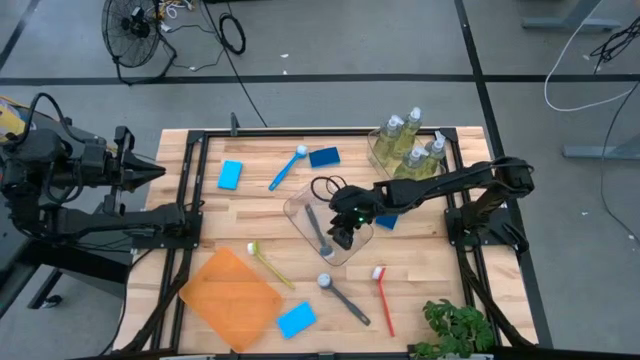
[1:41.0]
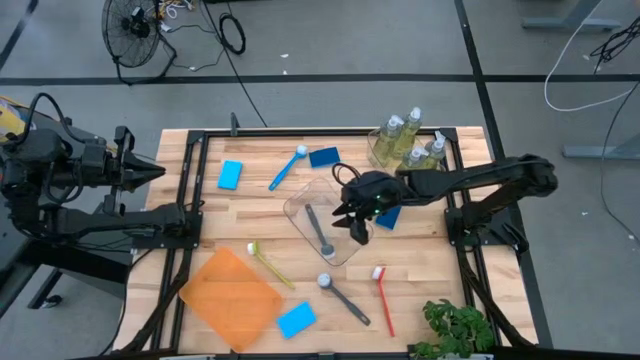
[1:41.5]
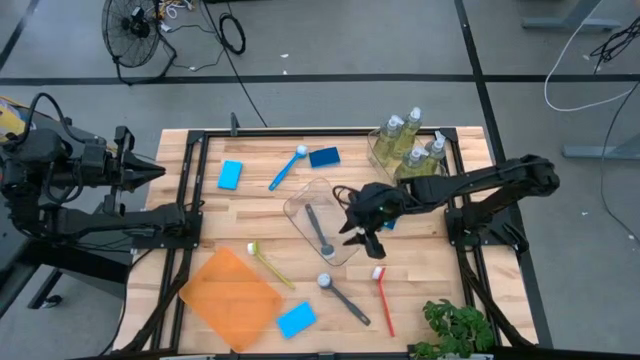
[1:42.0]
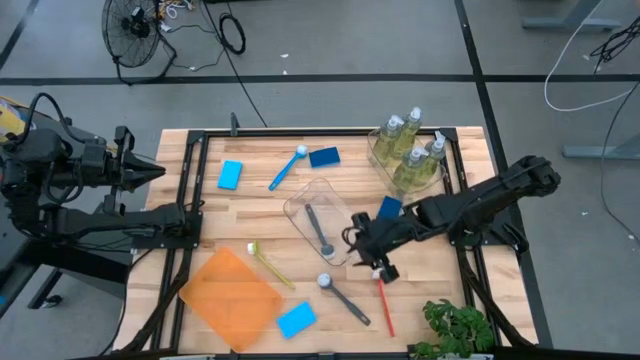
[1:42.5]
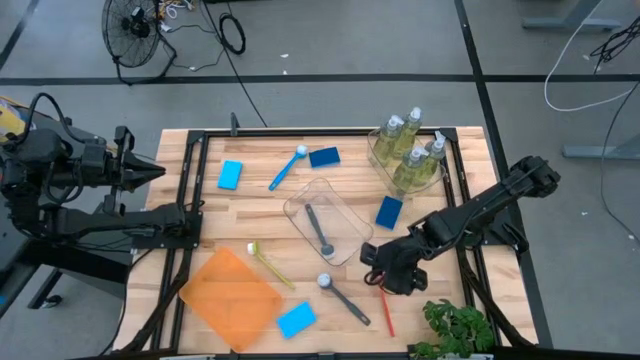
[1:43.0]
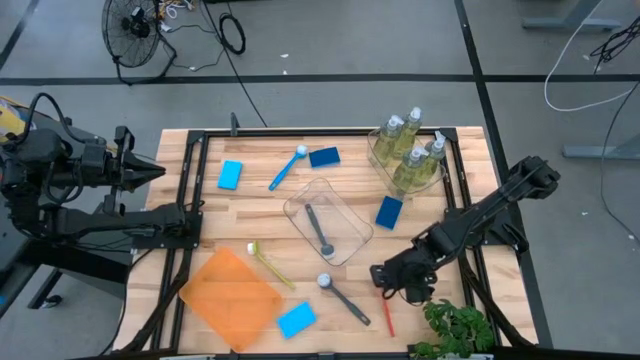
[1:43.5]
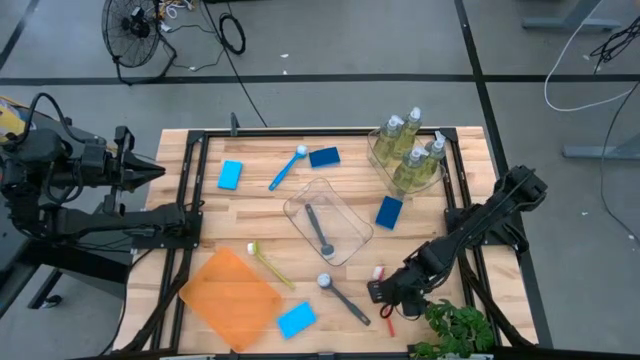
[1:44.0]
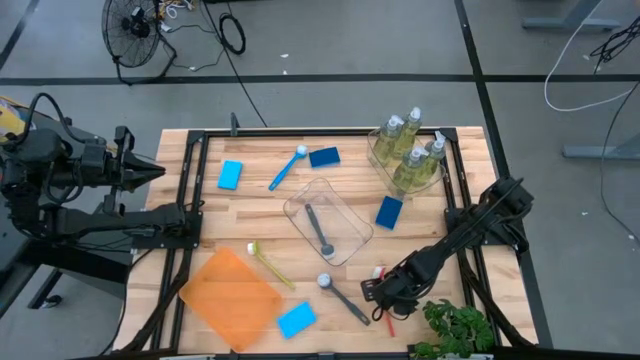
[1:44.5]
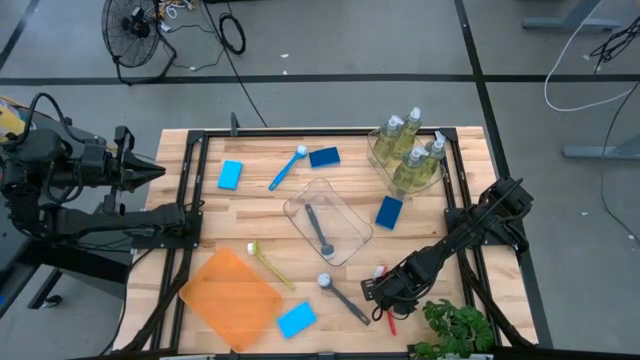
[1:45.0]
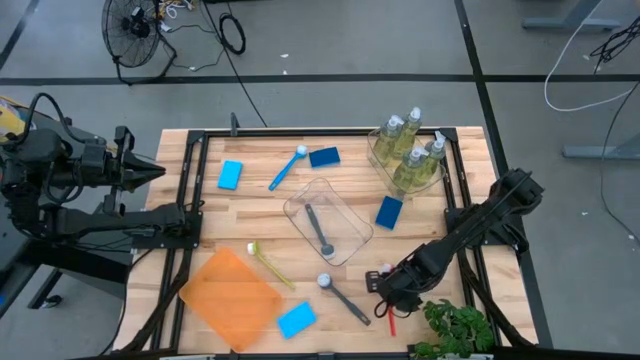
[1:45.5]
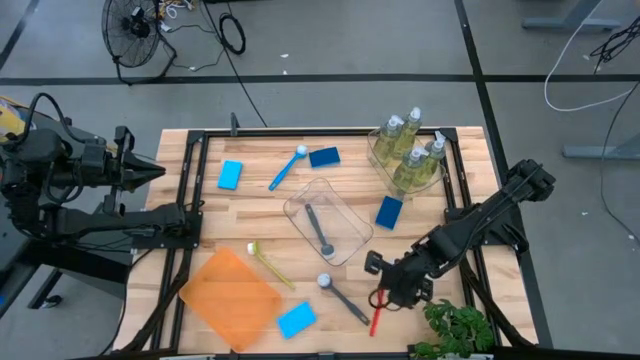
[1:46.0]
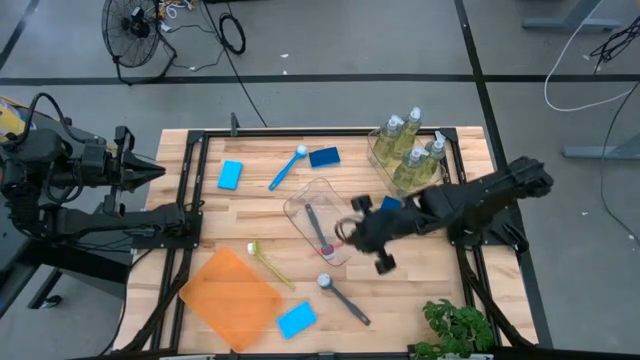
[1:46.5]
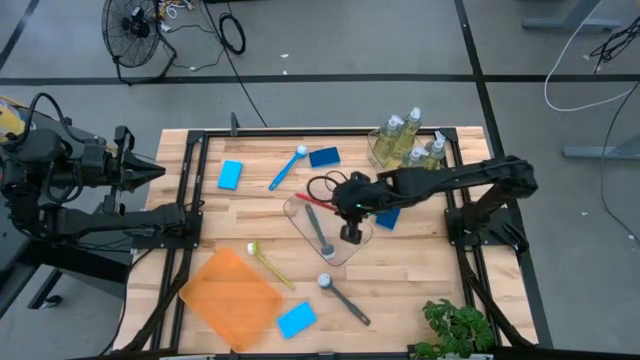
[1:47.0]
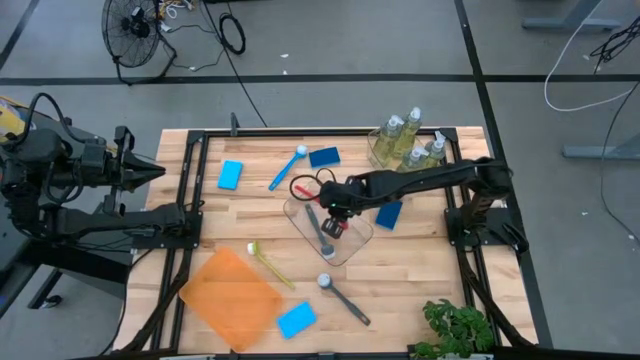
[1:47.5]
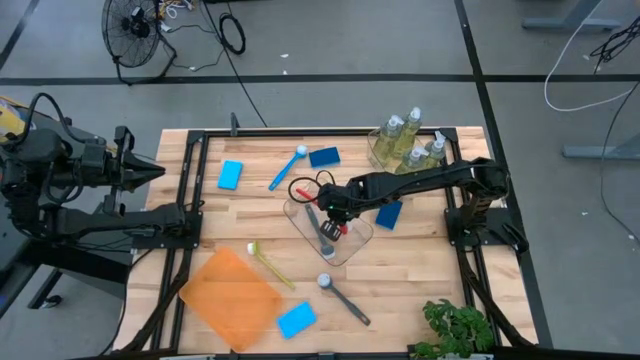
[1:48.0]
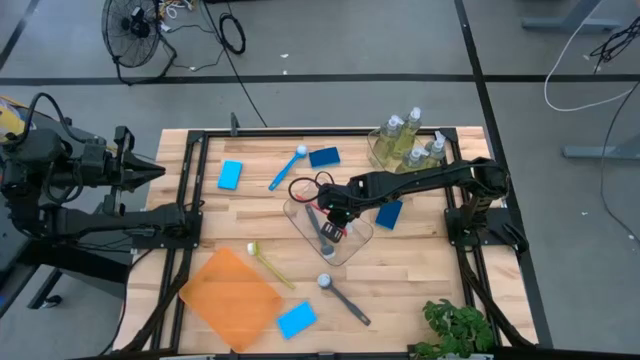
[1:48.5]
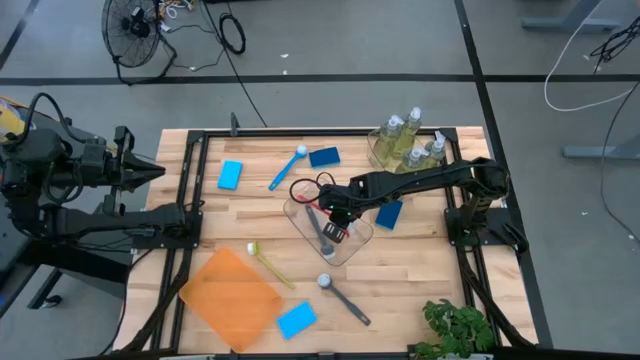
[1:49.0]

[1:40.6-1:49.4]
Task: Pick & Place Kitchen Sink Supplies
Put the orange dish brush into the bottom transparent bin

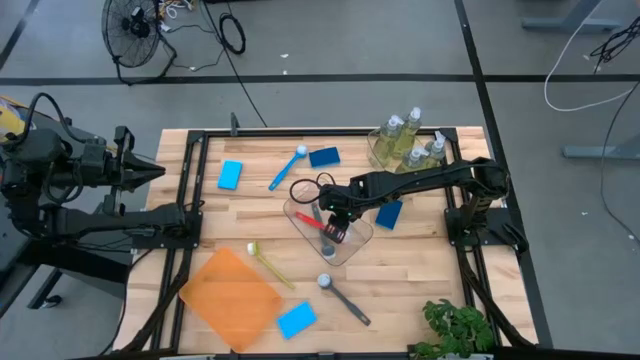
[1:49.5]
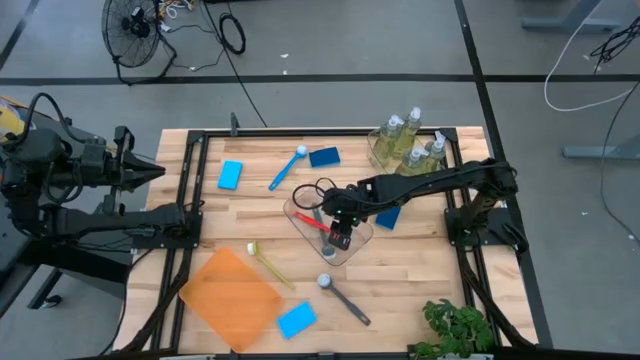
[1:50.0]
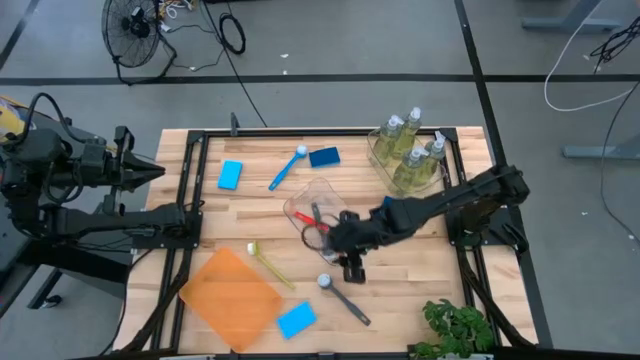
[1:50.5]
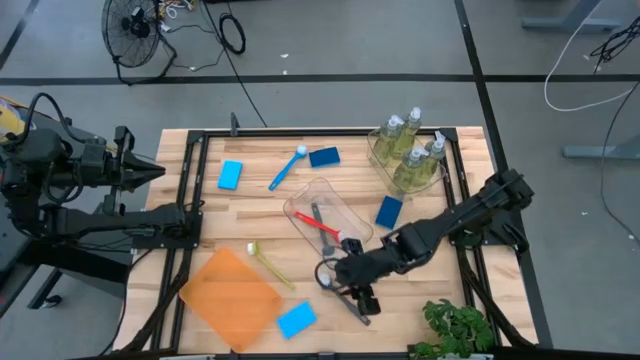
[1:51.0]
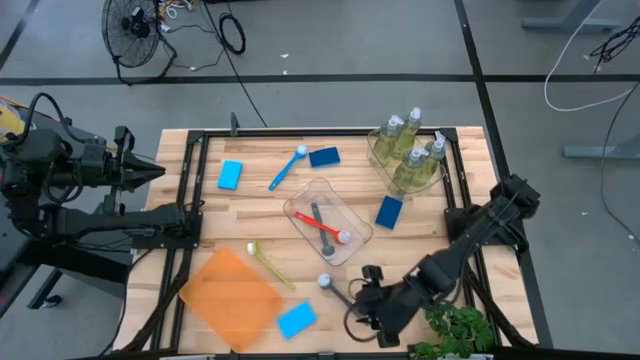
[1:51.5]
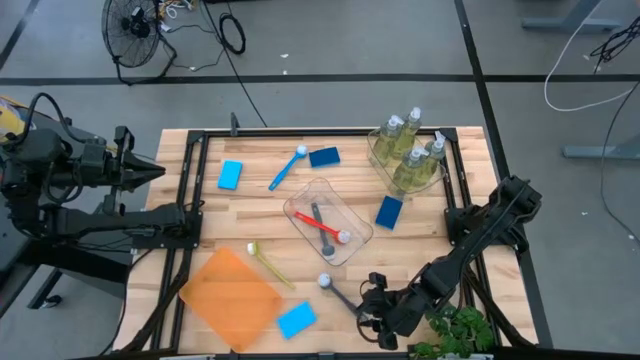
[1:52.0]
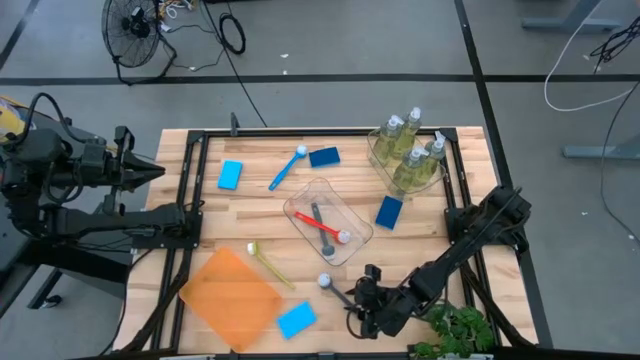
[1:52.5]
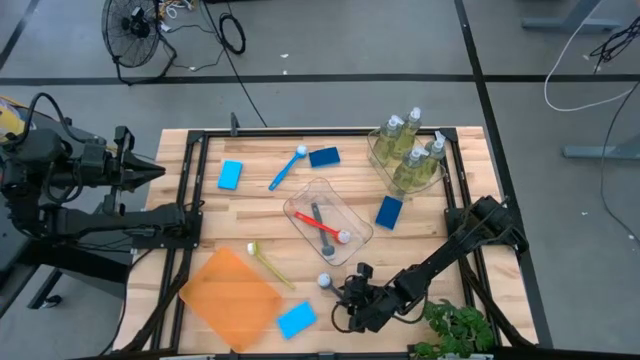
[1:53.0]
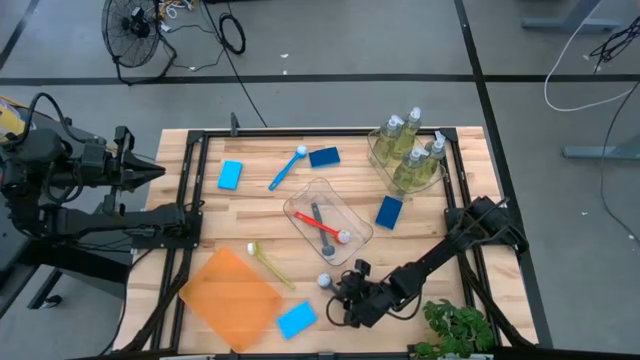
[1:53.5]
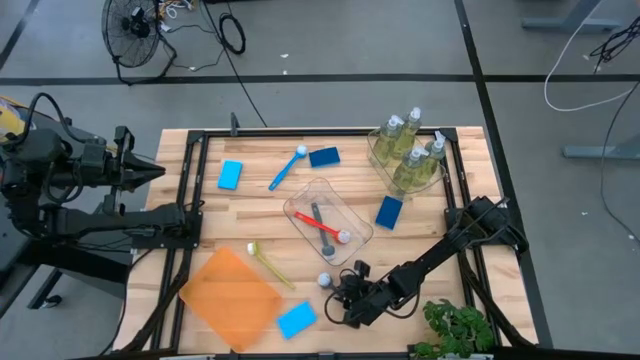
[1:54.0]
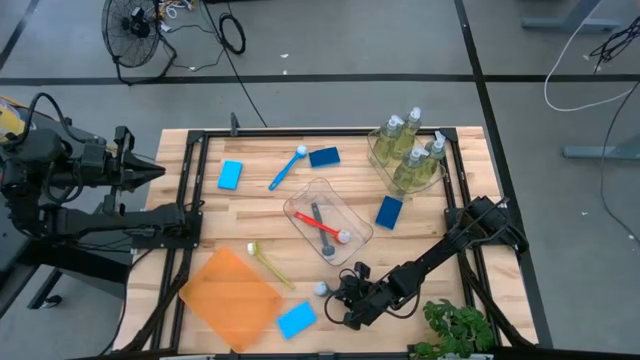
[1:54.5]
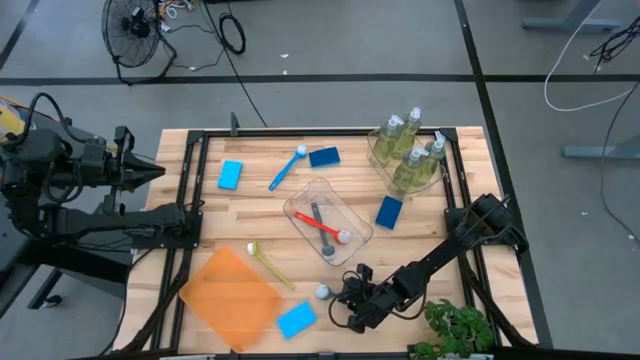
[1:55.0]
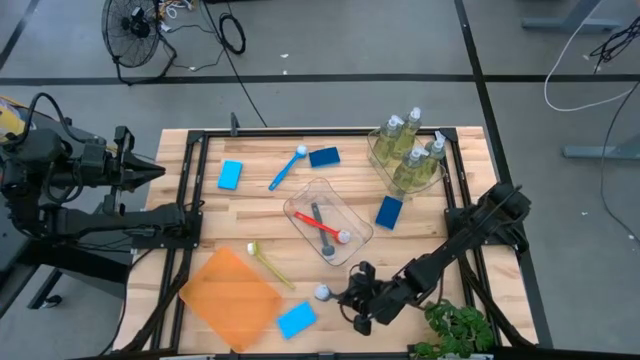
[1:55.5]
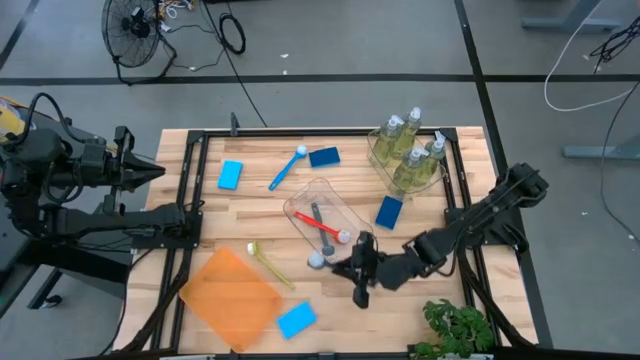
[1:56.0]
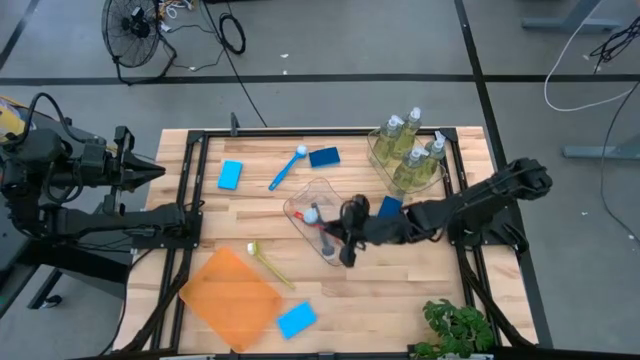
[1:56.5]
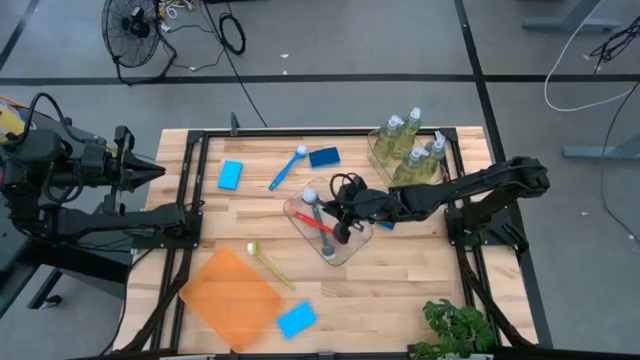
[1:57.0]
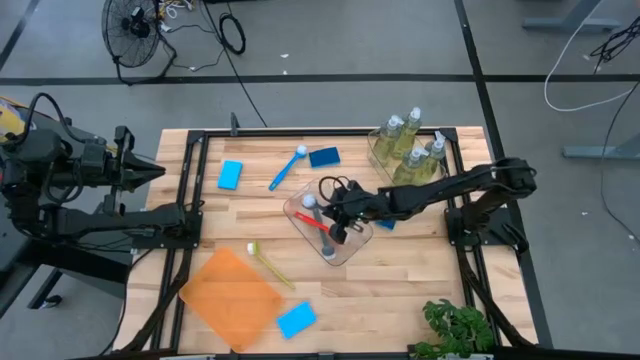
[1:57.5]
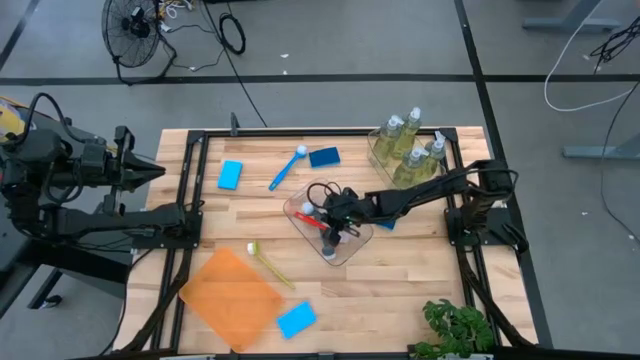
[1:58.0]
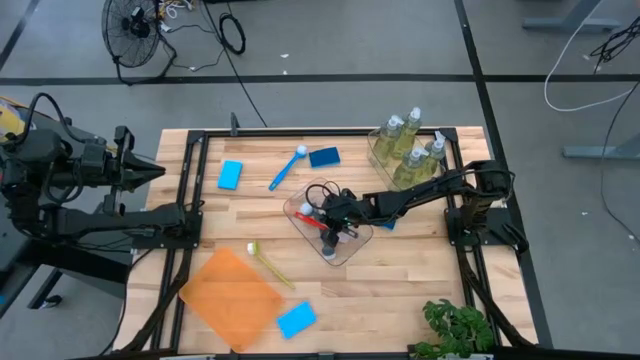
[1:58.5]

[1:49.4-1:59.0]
Put the gray dish brush into the bottom transparent bin

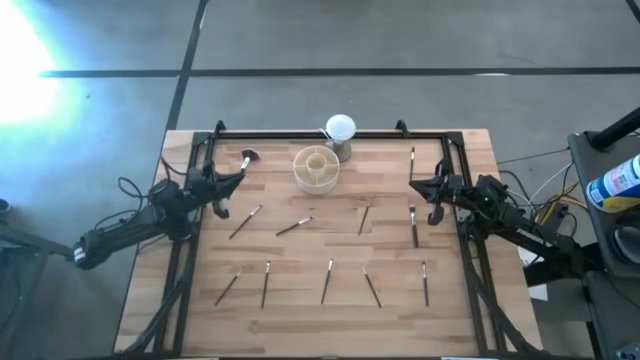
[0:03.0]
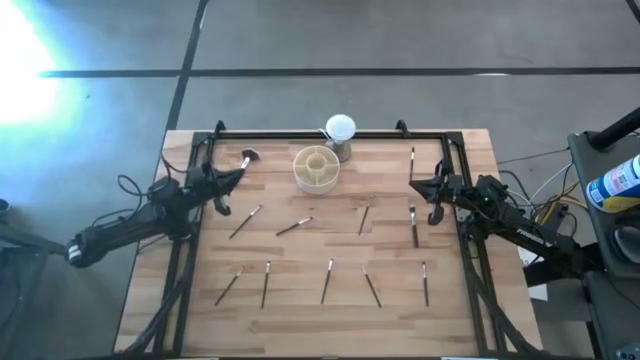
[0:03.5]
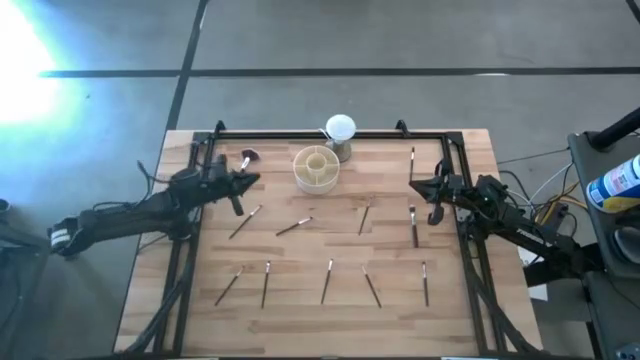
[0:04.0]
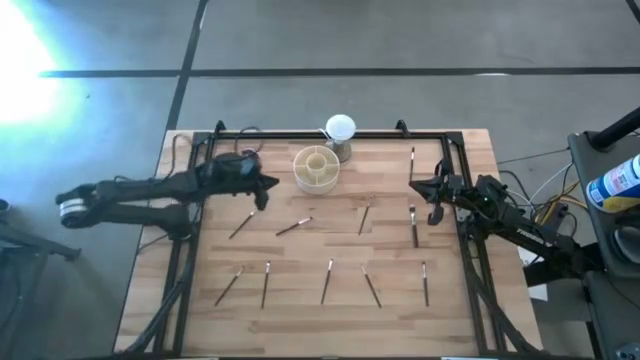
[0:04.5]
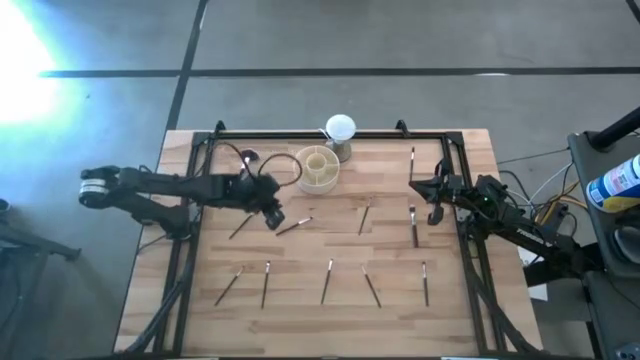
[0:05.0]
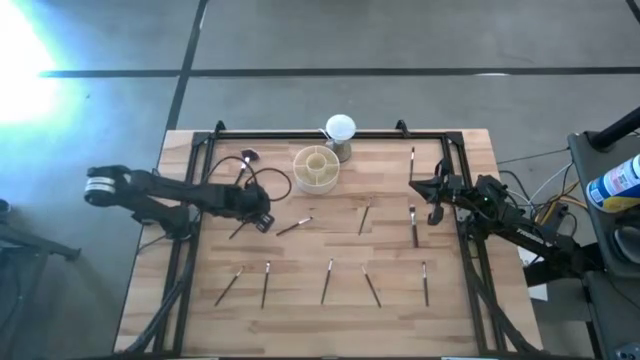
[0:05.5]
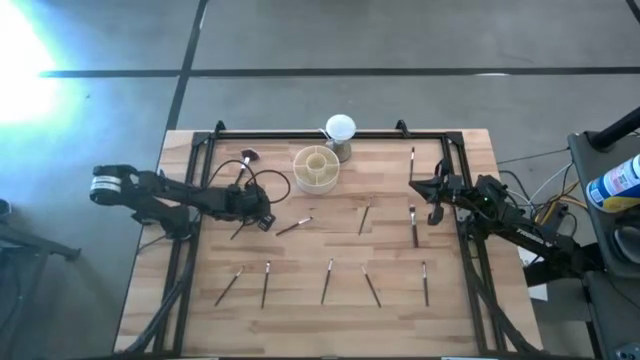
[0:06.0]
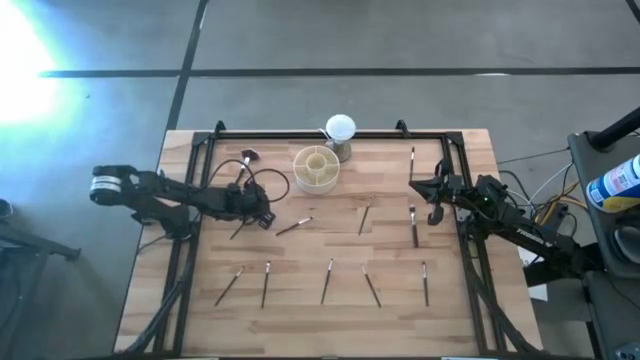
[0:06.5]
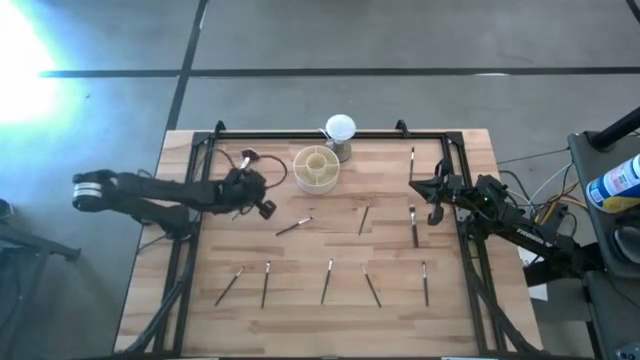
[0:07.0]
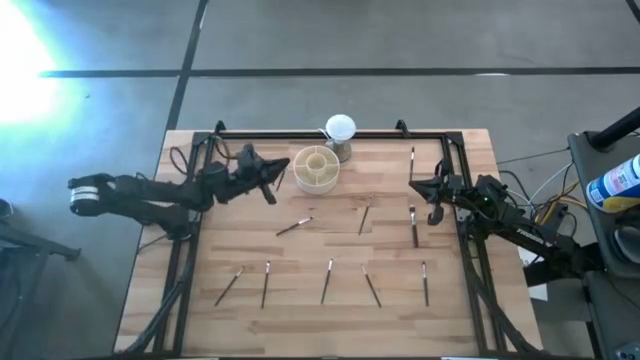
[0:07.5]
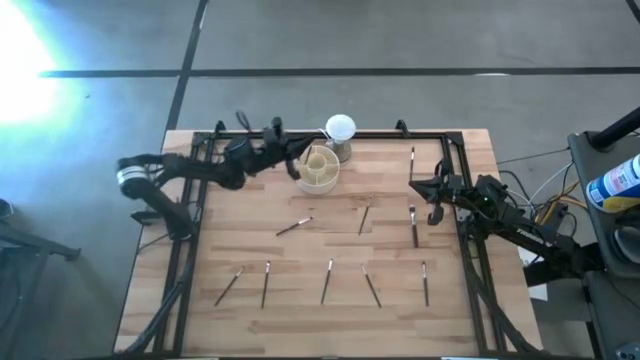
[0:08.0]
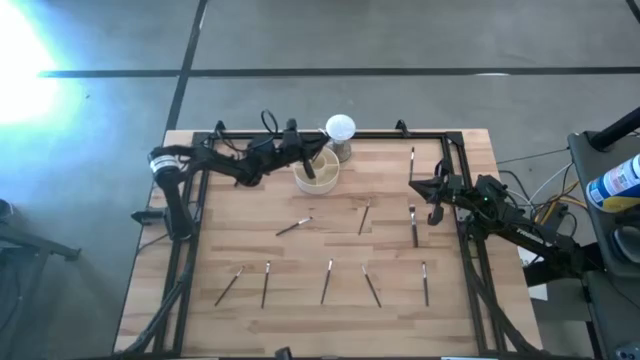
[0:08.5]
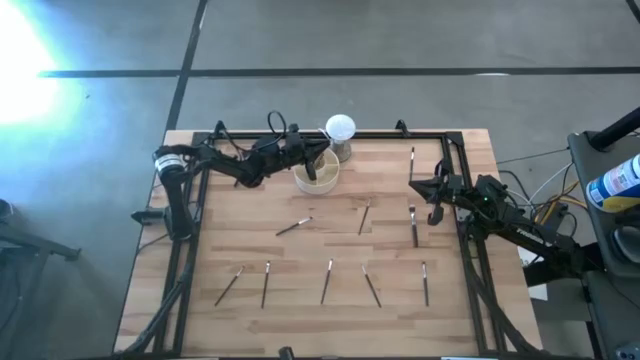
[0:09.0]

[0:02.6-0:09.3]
Task: Put items in baskets/containers
Put the black eyeshadow brush into the white organizer
